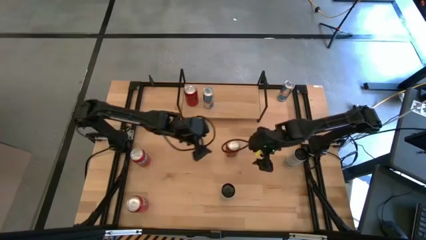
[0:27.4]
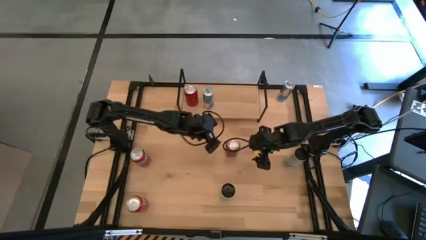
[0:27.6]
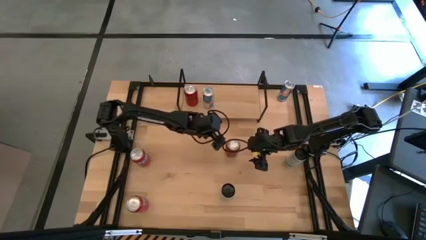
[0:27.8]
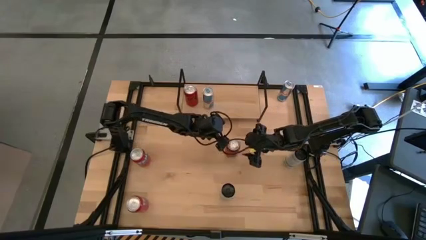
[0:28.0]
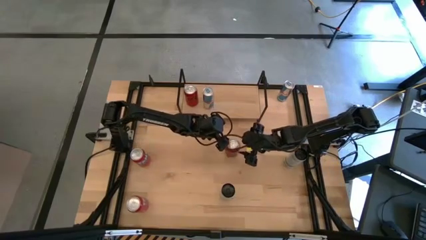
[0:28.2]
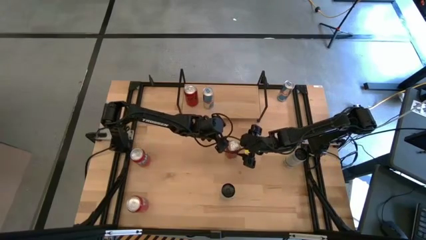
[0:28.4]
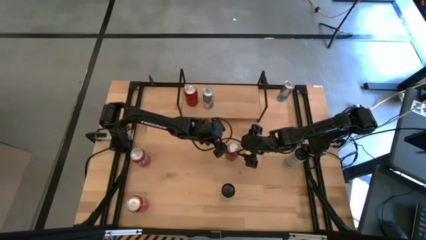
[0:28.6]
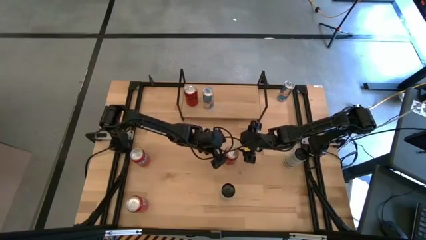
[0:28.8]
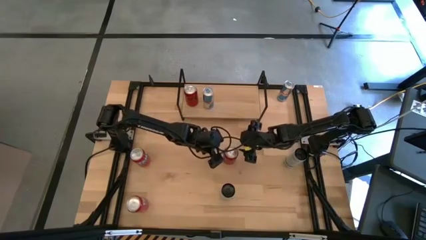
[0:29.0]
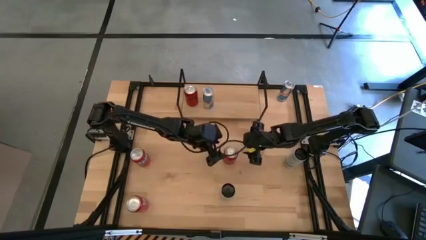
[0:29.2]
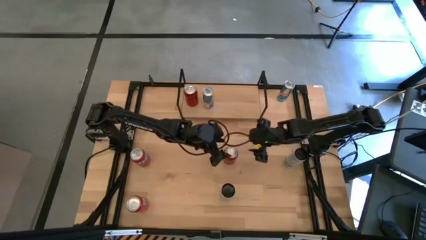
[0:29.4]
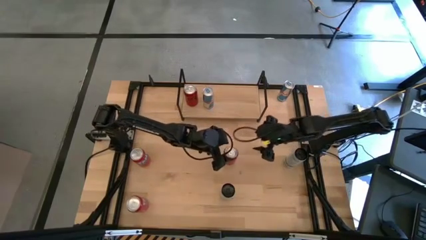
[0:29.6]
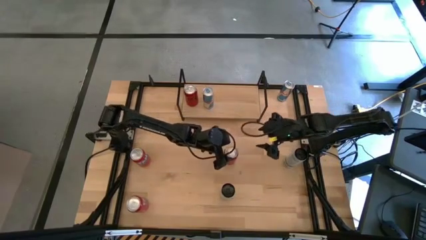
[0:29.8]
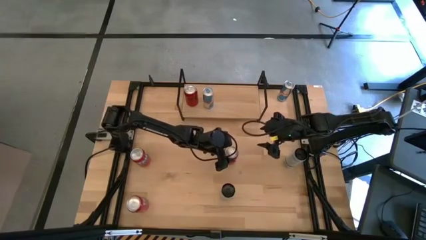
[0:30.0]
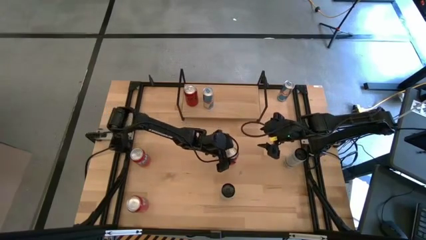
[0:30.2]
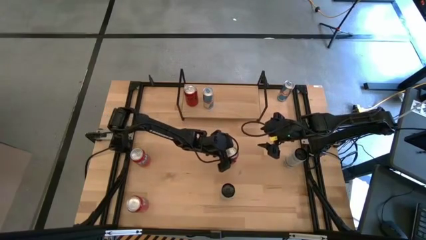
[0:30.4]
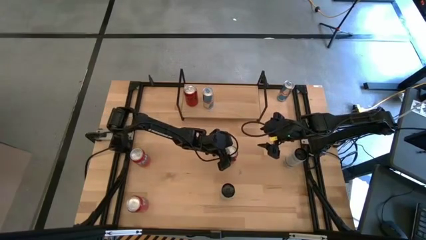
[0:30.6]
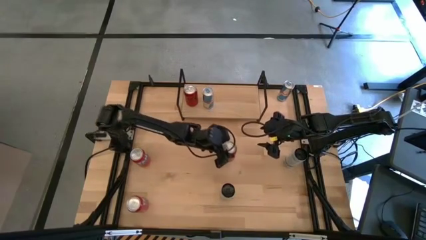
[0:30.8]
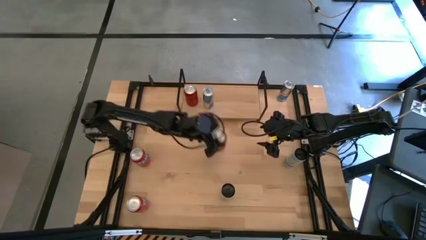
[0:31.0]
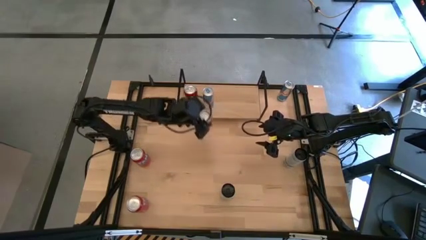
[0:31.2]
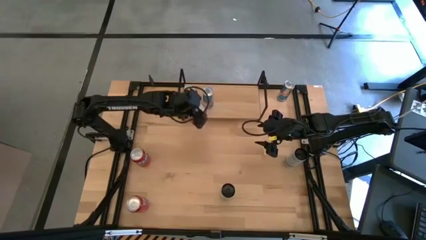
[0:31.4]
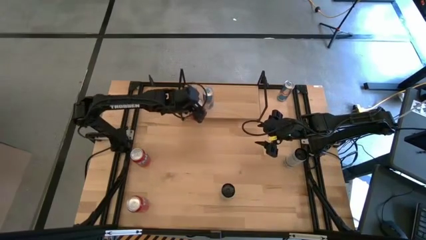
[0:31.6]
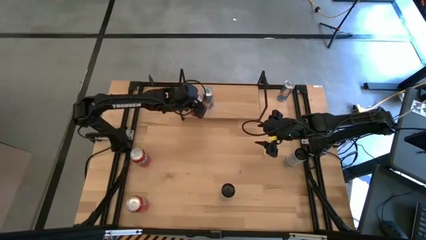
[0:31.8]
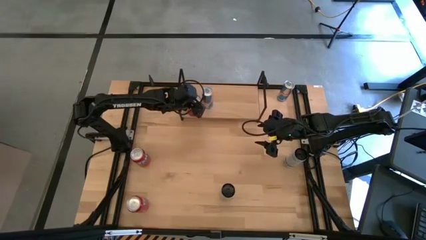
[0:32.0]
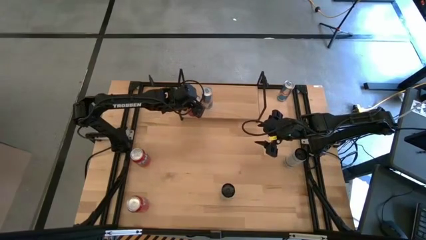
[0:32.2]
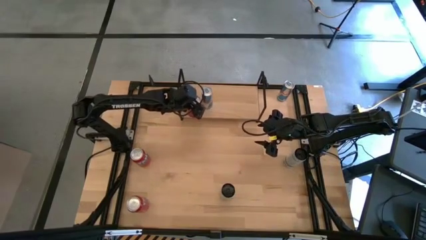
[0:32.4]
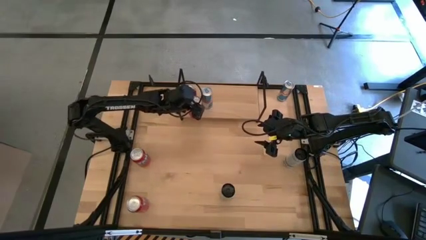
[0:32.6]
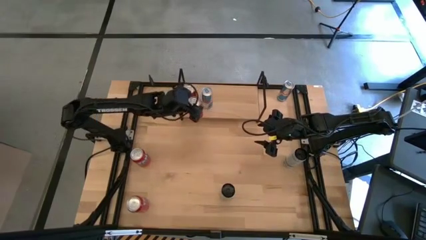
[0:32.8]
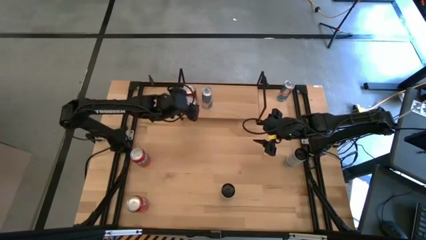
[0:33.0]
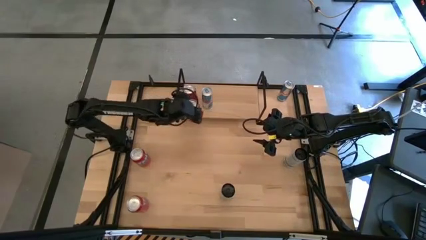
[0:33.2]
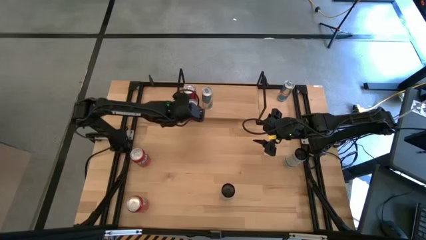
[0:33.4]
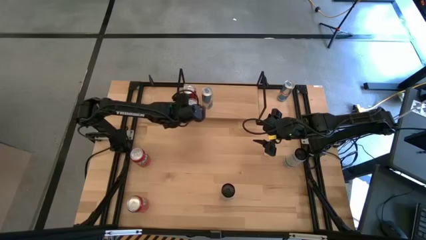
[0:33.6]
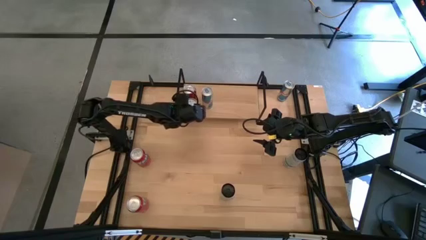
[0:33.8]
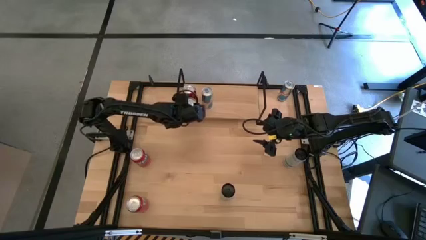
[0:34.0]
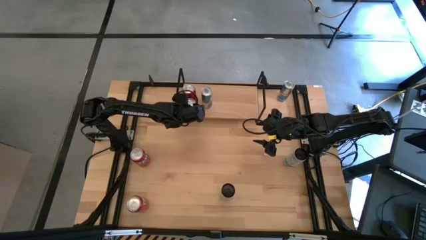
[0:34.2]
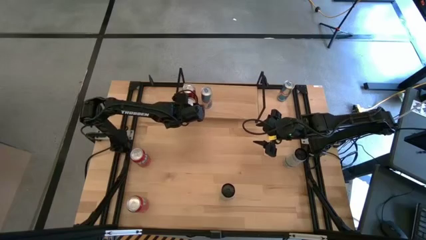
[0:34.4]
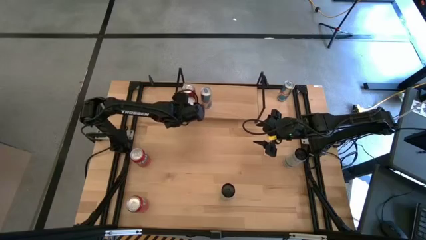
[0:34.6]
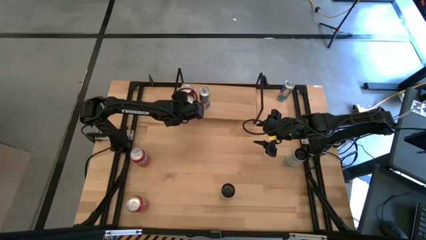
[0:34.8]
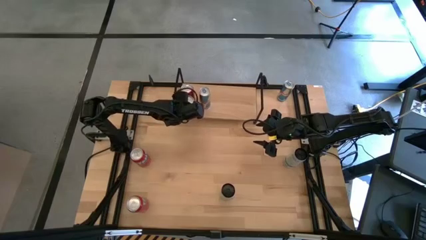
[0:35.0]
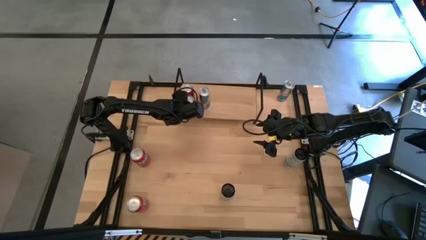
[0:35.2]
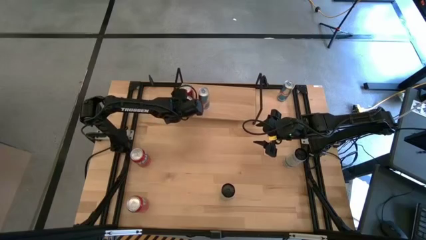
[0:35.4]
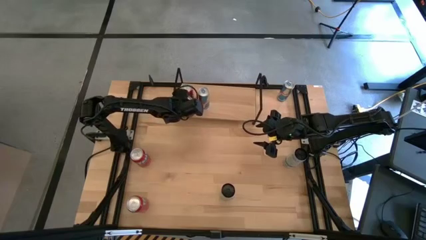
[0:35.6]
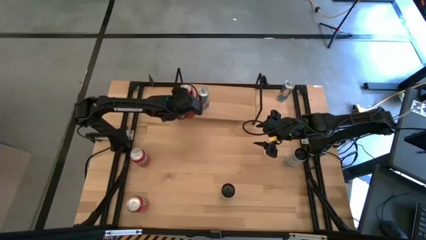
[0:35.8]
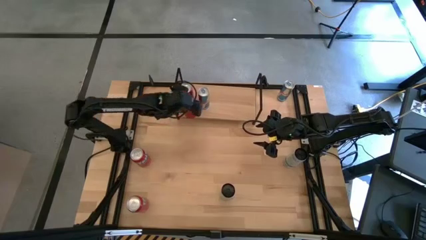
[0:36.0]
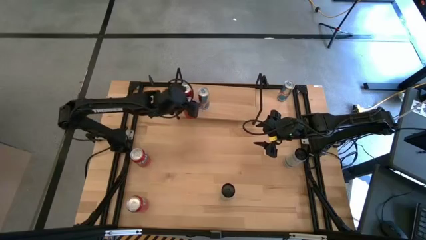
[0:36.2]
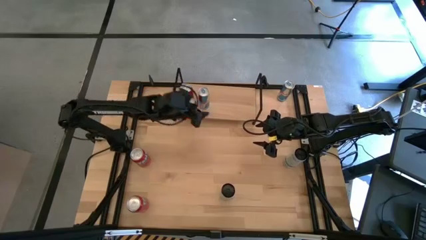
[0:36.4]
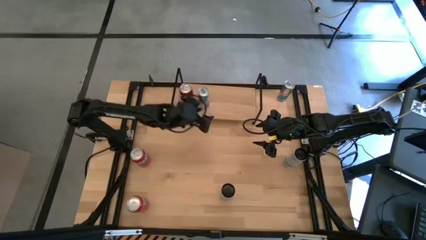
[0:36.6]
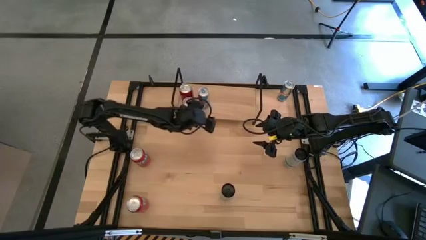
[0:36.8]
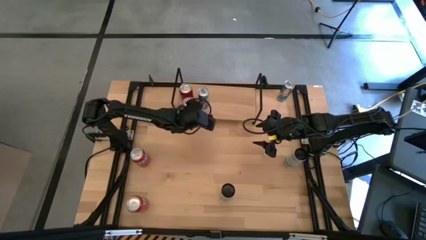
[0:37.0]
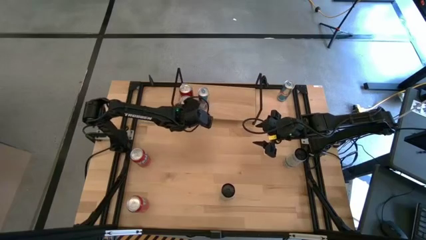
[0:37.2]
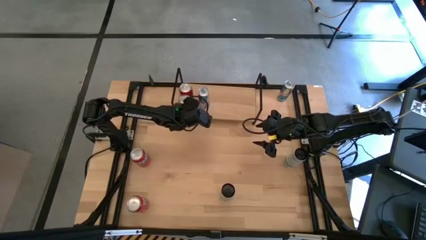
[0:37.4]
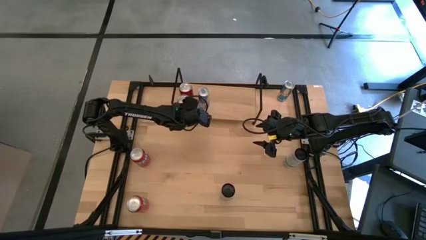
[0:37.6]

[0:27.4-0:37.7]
Task: Place canned beverage on shelf
Put the red black soda can on the shelf aligned with the other red black soda can

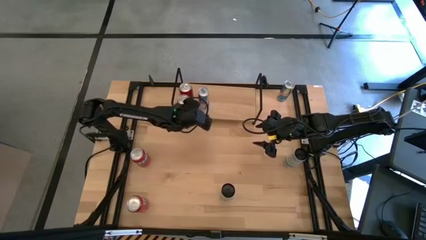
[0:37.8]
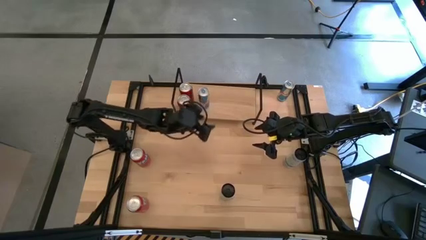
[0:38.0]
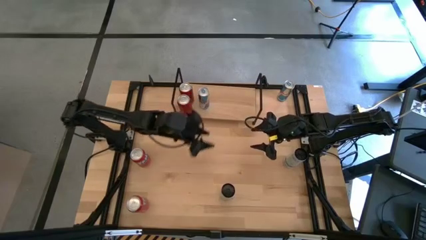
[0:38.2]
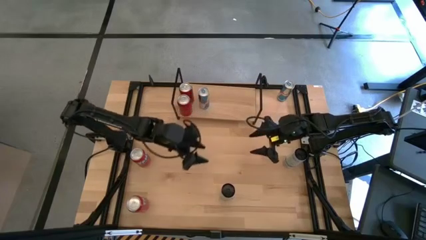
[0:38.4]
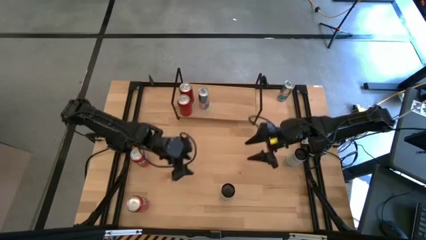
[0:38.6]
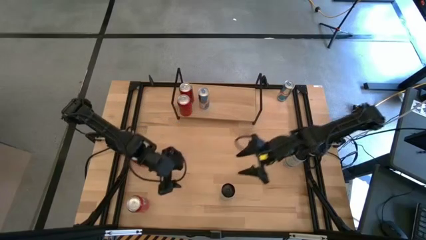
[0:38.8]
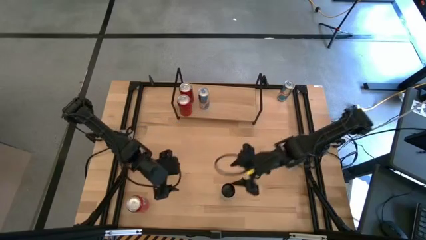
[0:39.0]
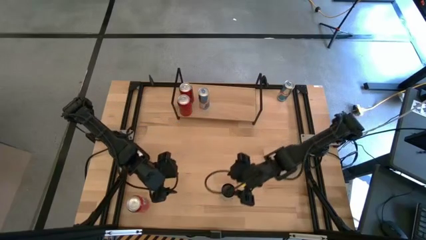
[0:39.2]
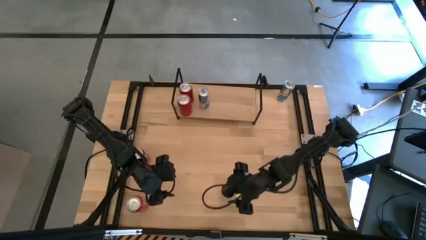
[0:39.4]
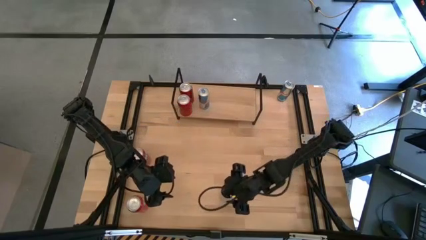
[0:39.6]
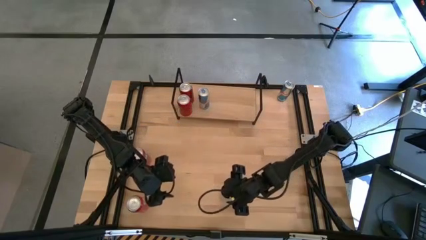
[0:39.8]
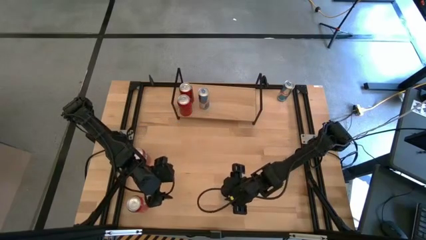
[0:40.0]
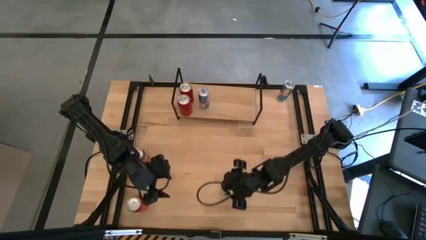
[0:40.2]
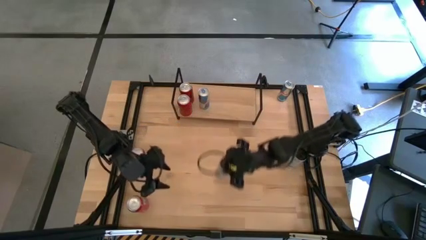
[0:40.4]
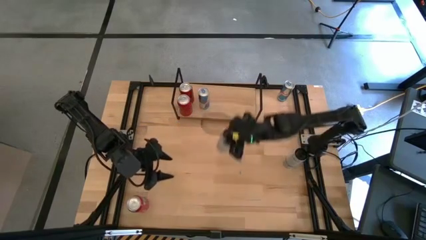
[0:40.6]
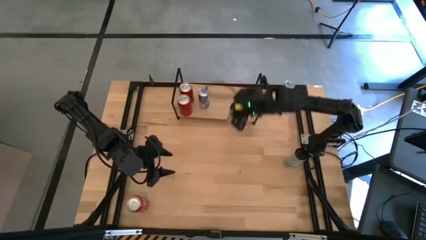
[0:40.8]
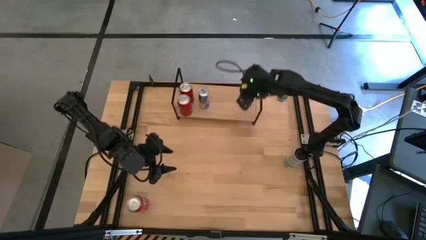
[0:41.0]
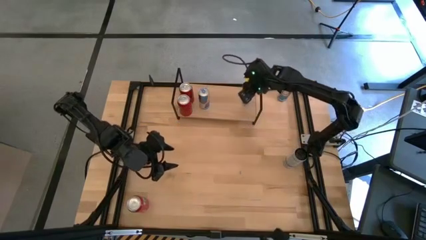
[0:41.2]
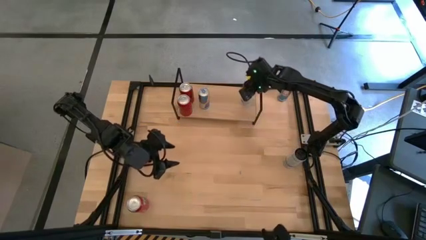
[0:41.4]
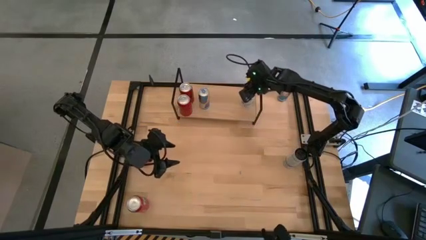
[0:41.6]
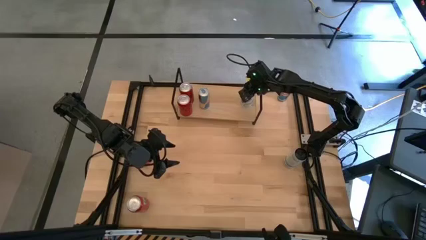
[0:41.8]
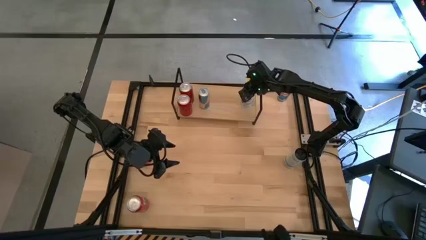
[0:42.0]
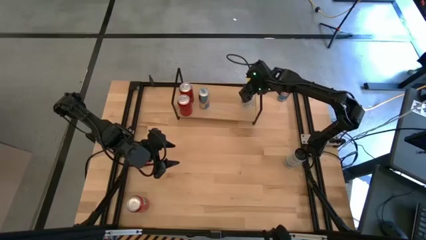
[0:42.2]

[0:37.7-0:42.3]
Put the left blue white soda can on the shelf
